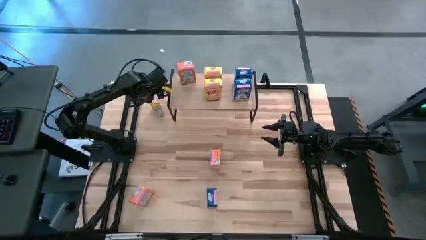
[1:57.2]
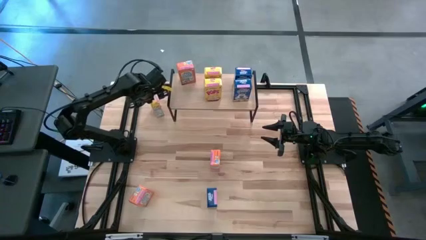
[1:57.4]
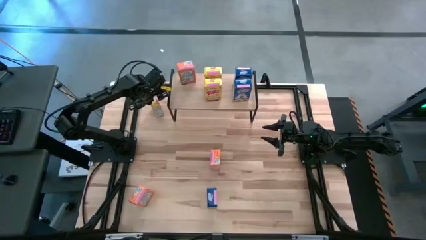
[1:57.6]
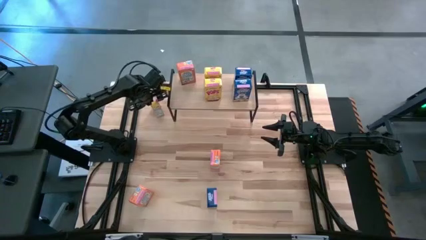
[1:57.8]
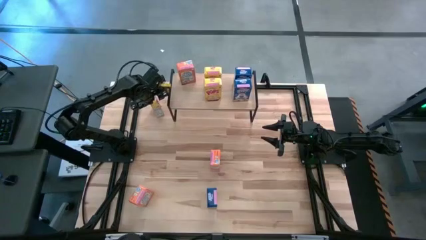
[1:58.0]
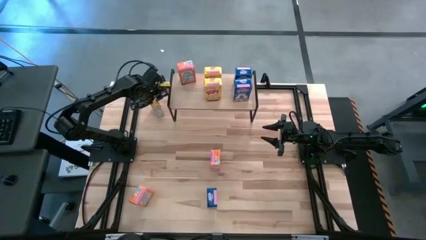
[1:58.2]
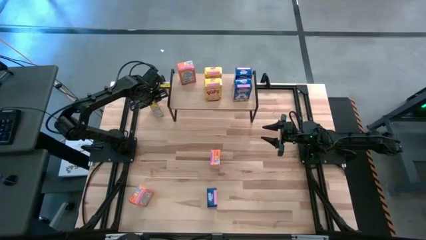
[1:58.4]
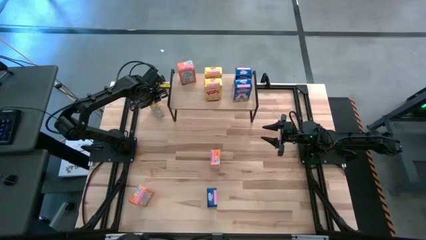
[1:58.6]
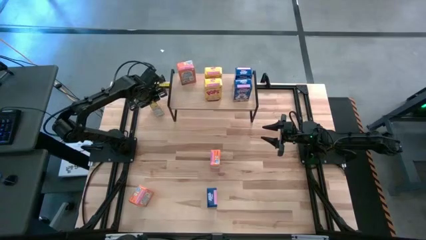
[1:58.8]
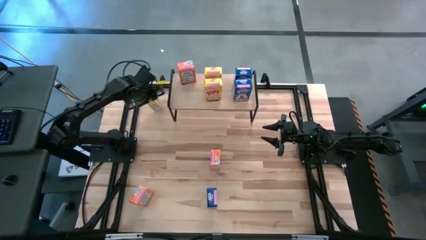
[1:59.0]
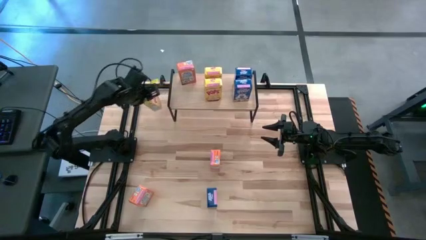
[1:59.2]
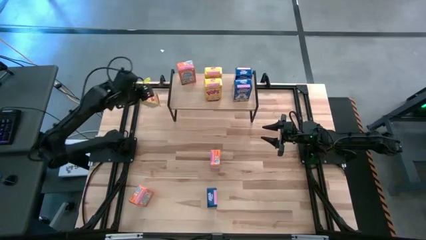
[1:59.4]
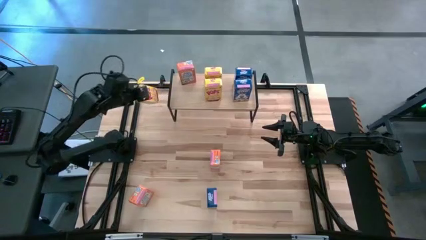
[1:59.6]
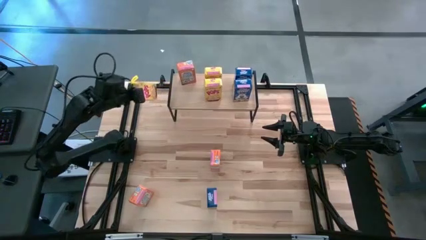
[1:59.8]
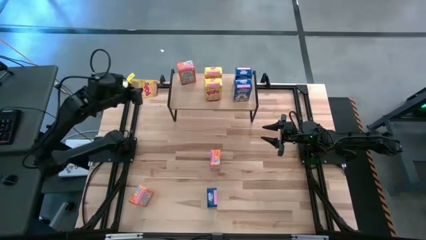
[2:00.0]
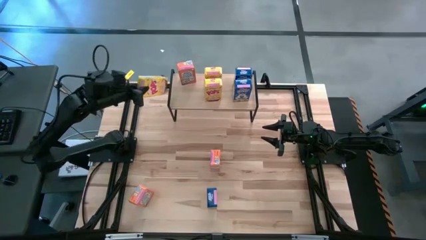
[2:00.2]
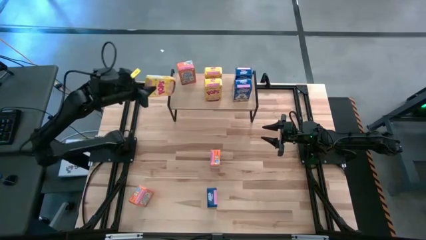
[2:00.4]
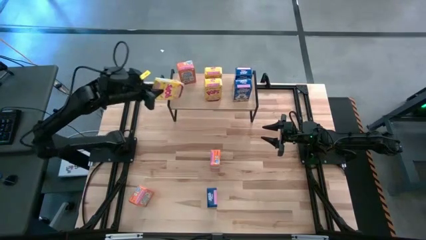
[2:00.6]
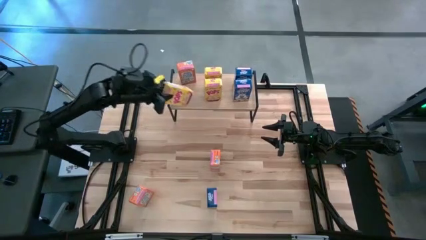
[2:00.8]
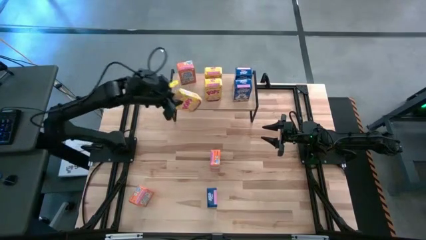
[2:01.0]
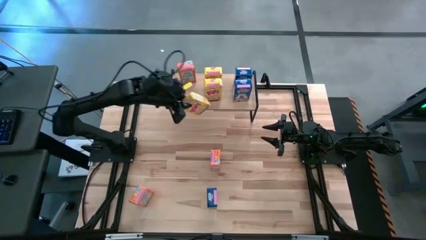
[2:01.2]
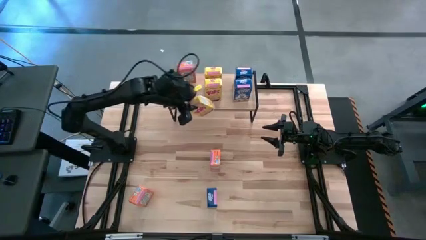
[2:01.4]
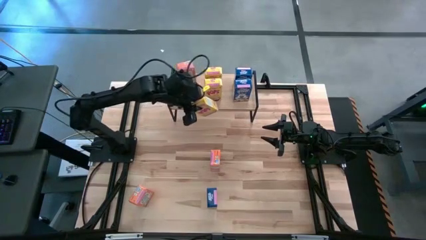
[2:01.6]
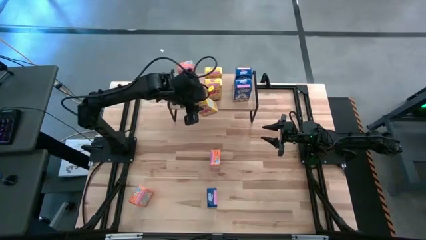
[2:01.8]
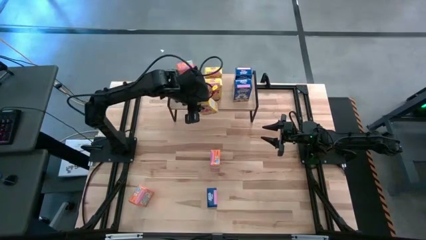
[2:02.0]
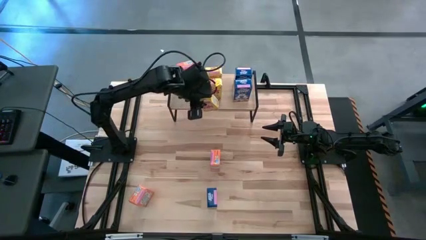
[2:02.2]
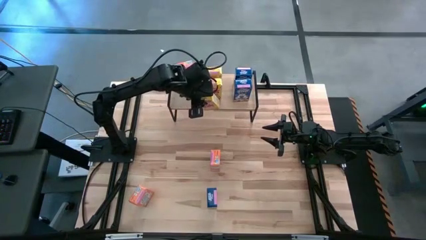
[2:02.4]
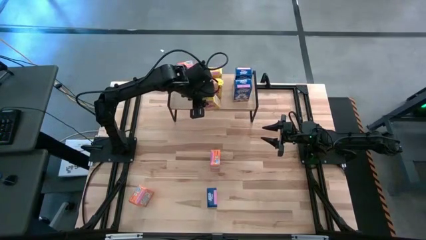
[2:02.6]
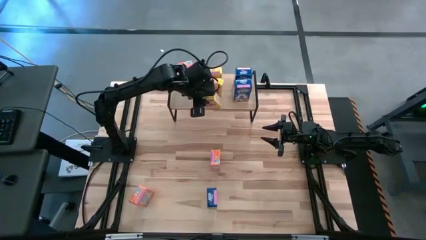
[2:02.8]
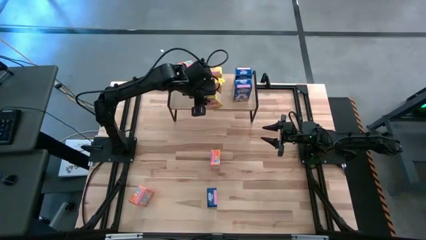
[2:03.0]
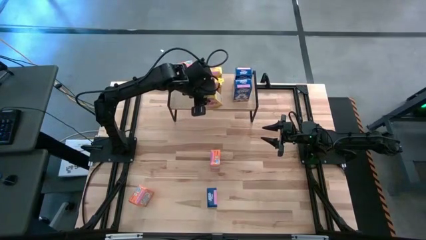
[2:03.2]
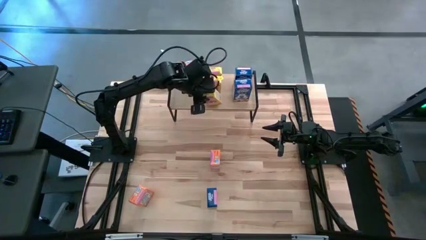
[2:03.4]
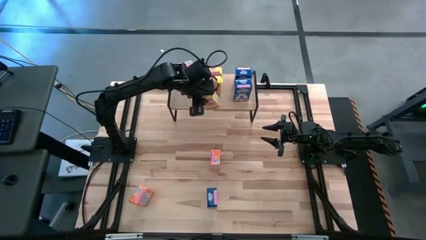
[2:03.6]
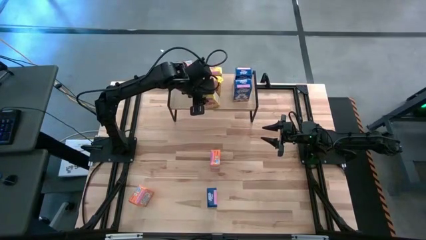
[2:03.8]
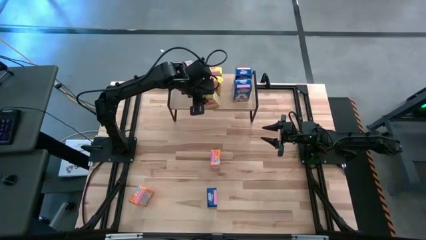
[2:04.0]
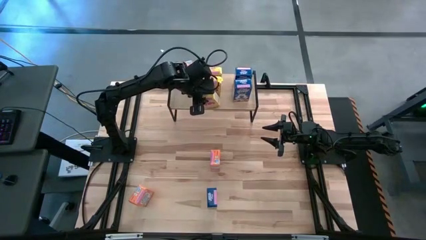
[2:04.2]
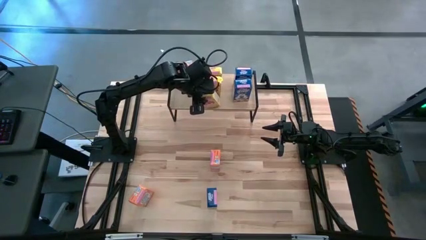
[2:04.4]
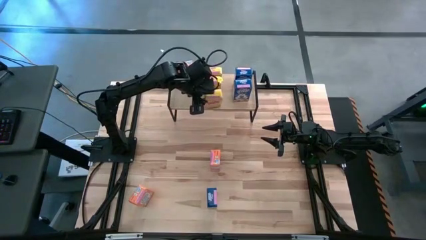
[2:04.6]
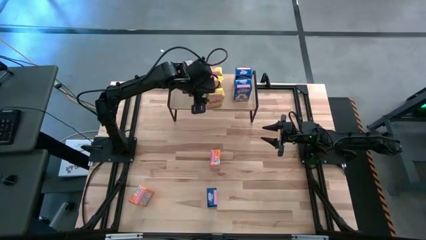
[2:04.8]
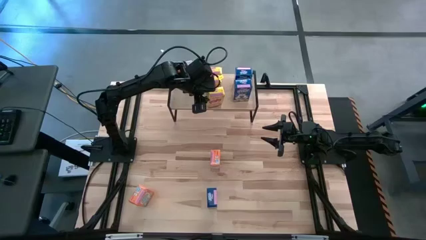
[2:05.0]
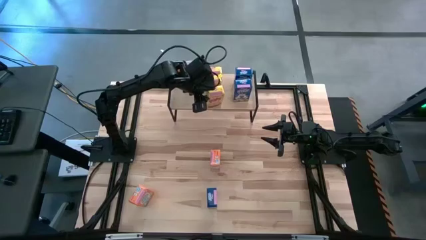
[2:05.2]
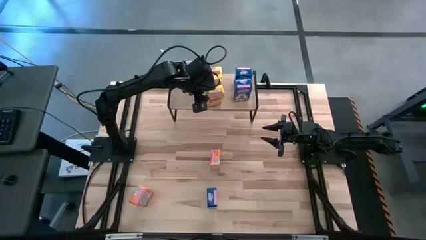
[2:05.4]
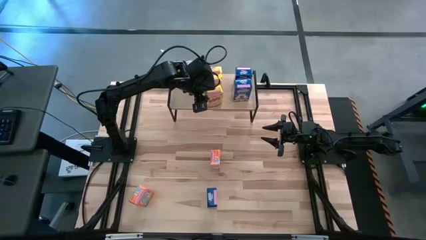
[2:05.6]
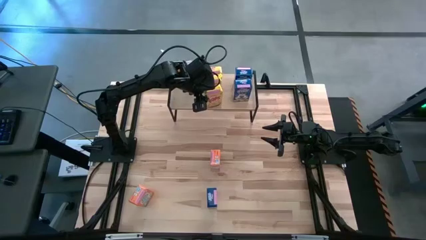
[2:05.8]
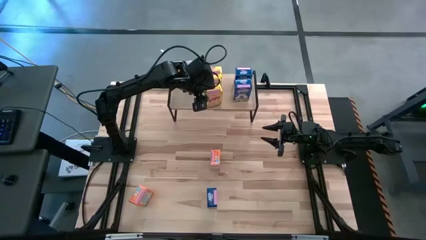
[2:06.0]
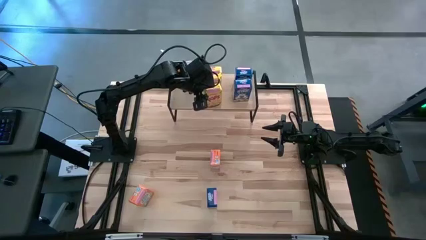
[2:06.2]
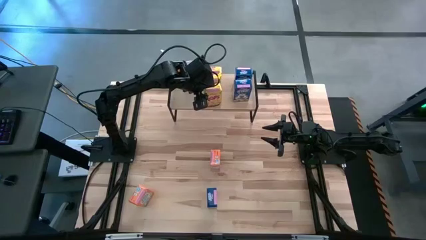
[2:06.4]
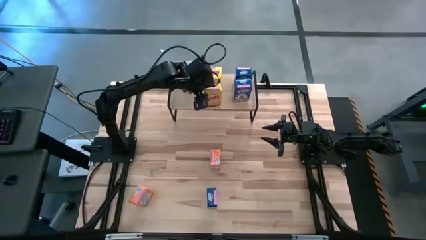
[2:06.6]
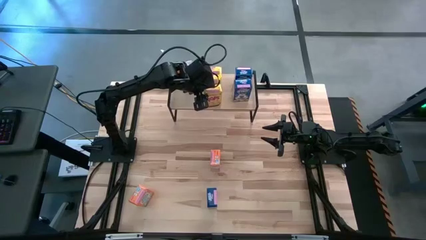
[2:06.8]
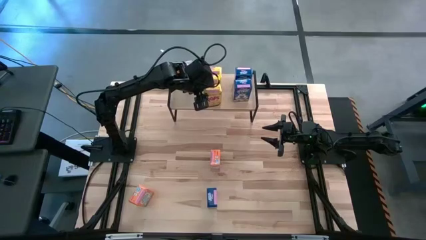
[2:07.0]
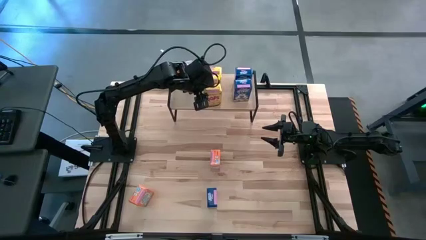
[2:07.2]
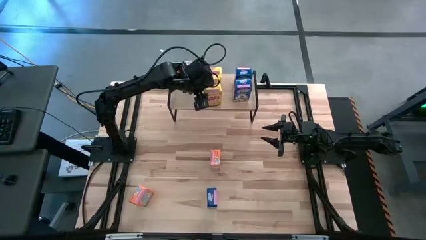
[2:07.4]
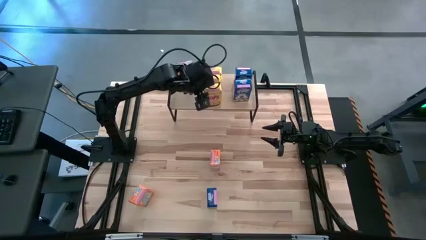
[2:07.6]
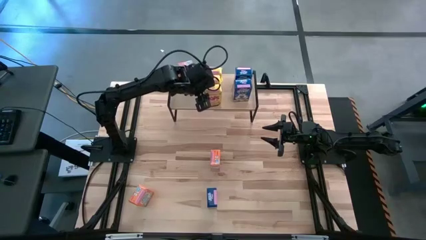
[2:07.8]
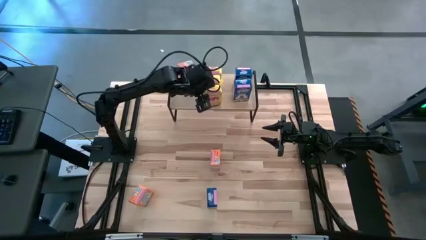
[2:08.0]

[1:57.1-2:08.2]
Task: Stack cereal on shelf
Put the yellow cereal box on the shelf aligned with the other yellow cereal boxes
